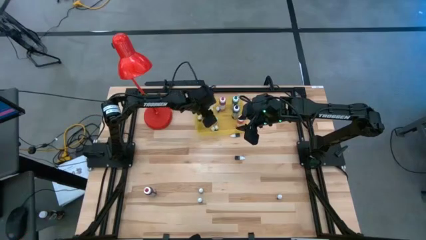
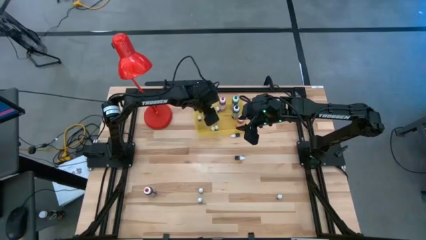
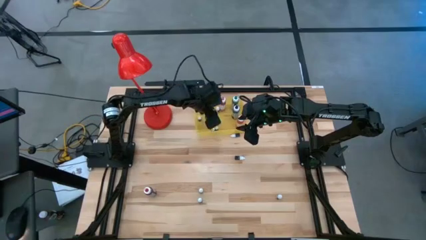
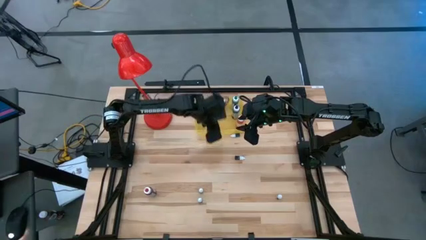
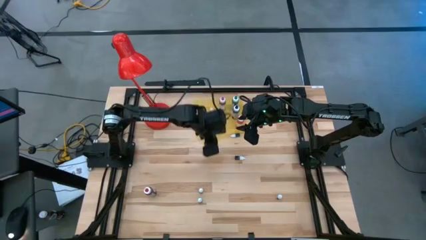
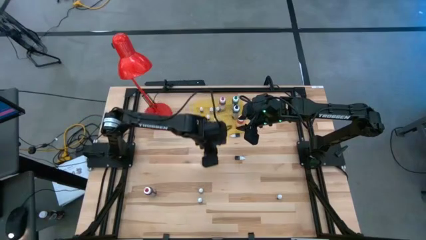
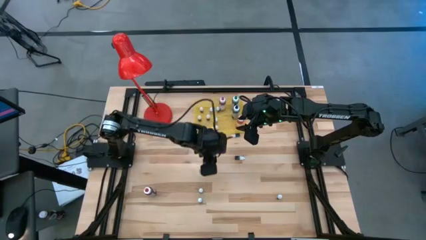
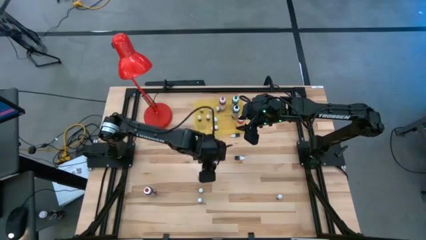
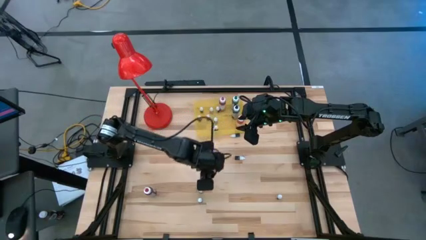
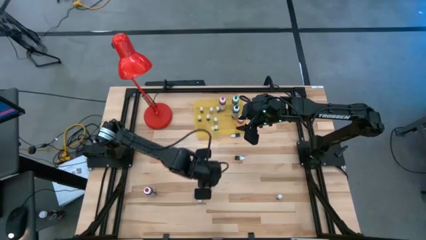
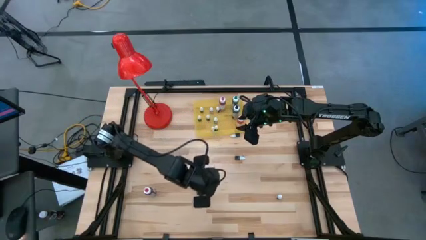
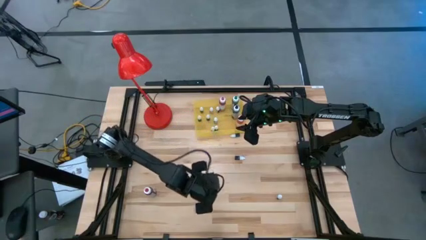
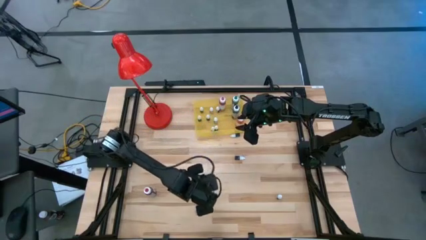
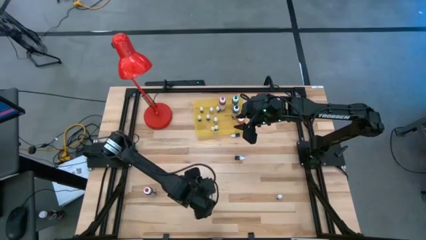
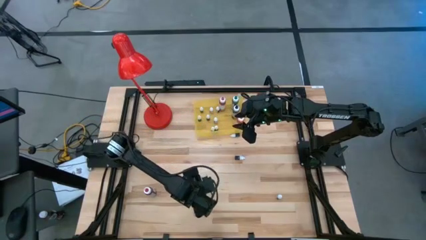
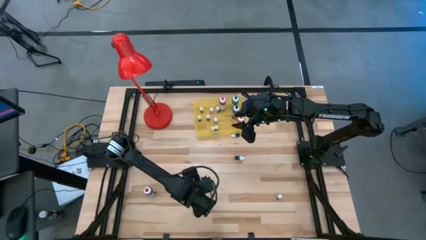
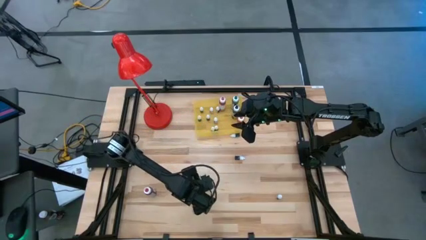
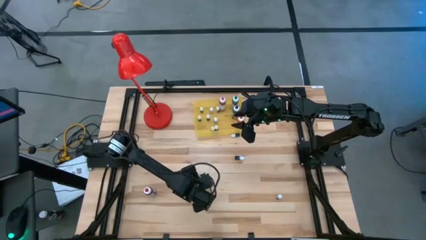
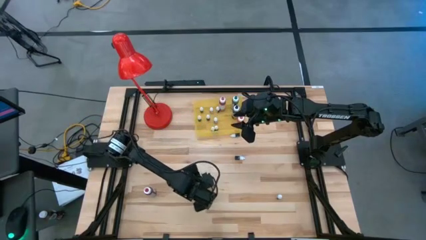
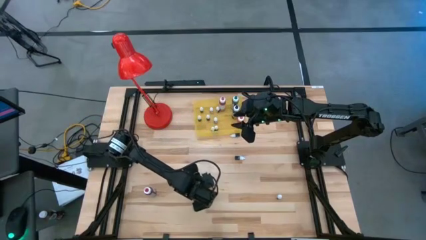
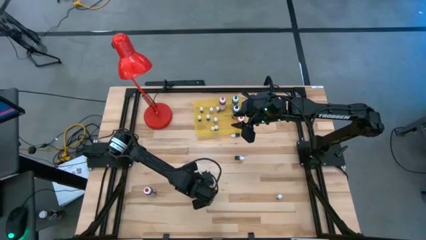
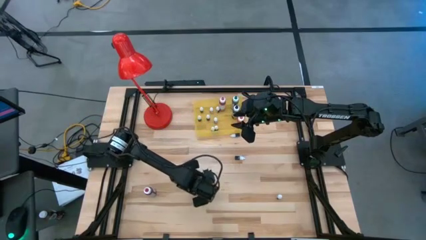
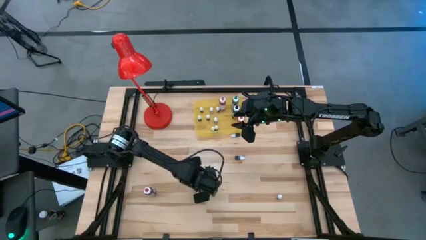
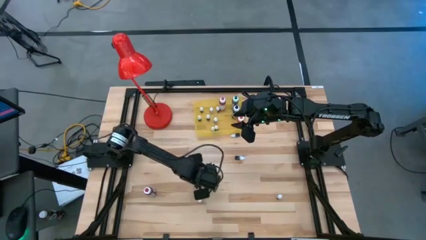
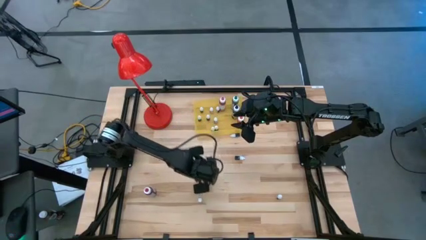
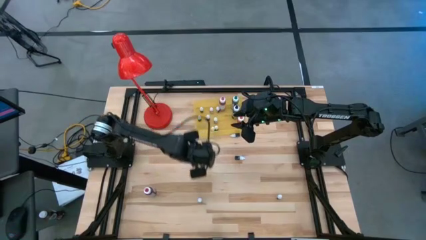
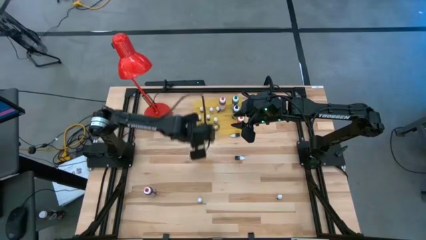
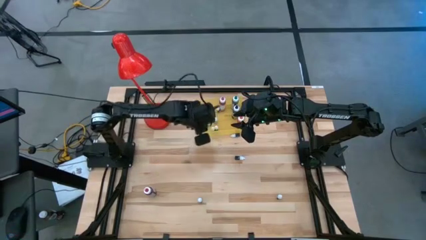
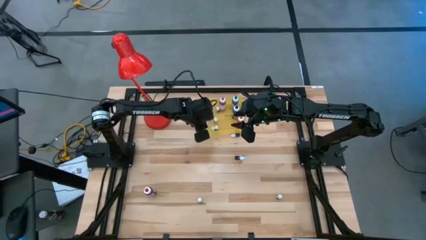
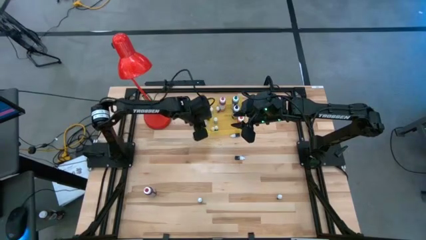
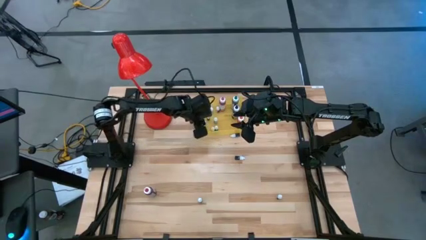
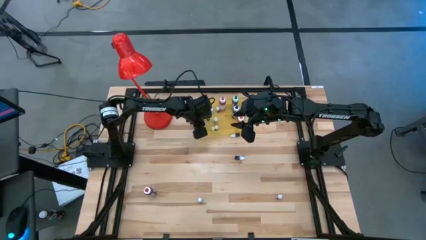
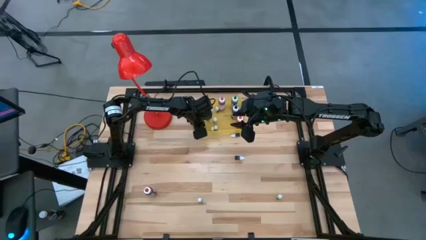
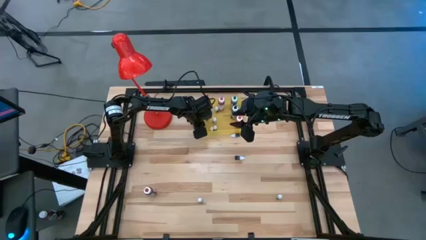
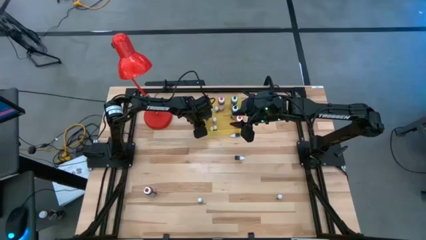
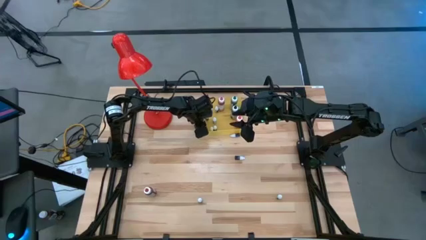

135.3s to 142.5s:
Task: Pick & Place food coloring
Put the small black food coloring bottle into the yellow bin

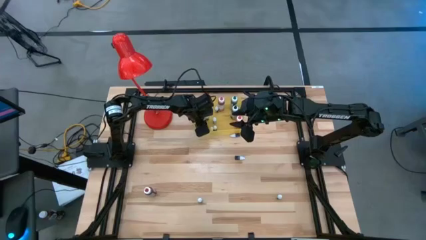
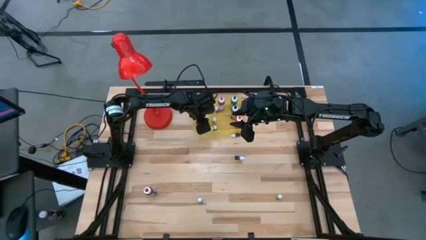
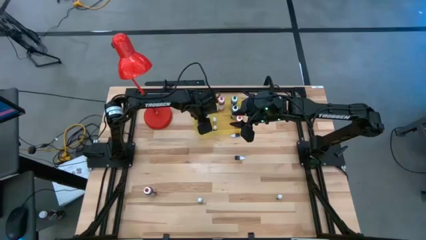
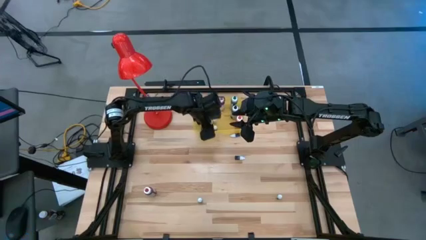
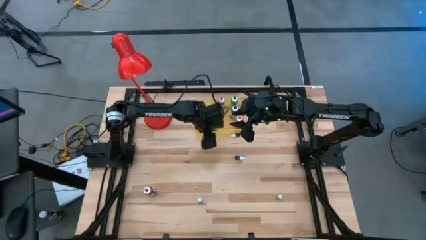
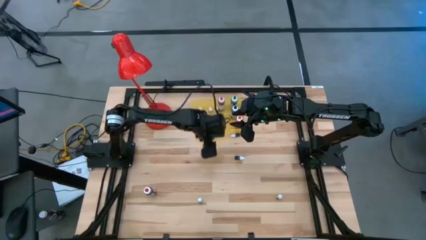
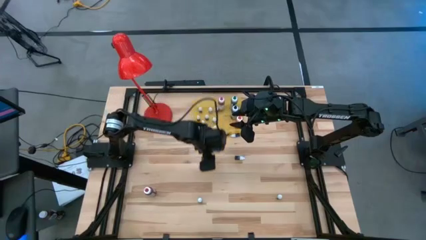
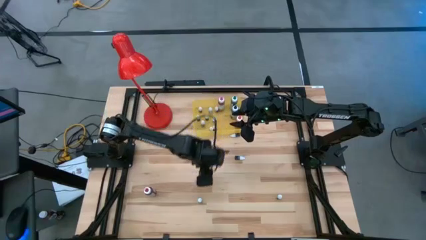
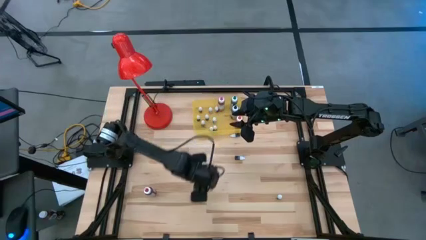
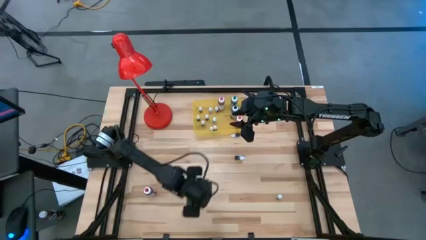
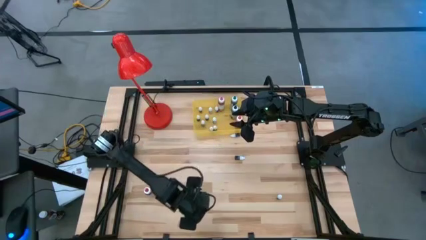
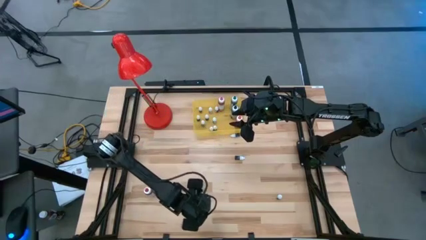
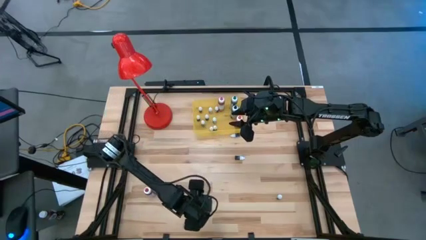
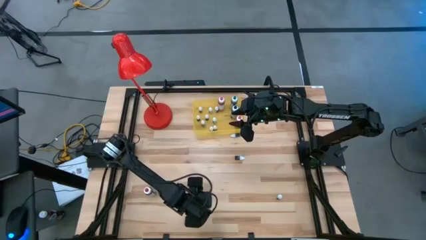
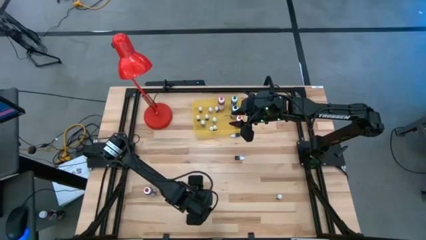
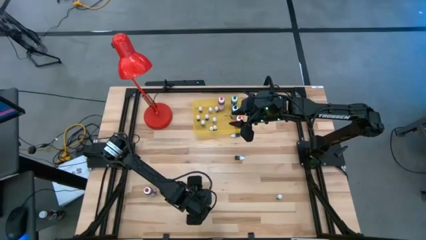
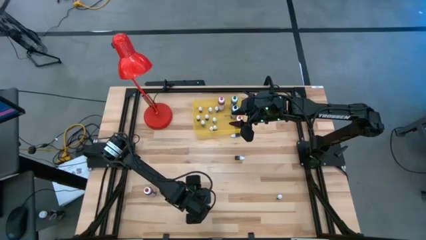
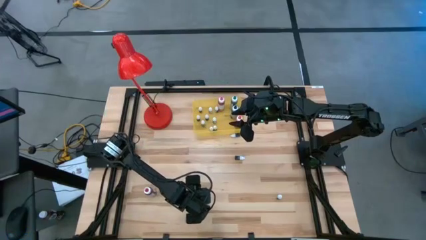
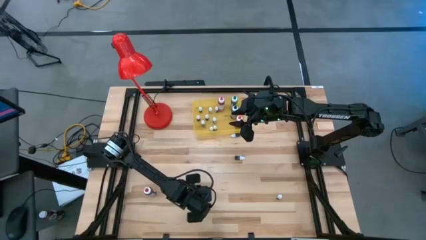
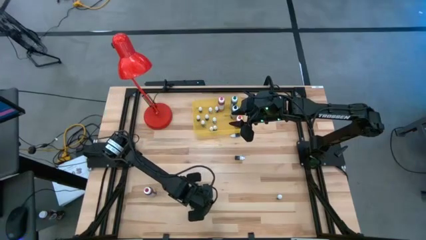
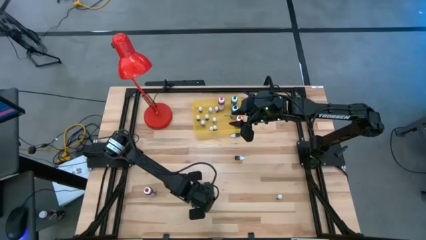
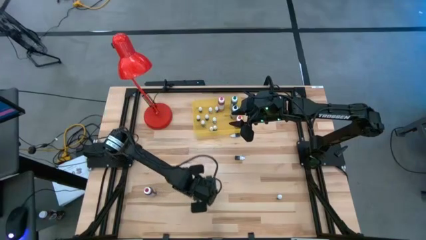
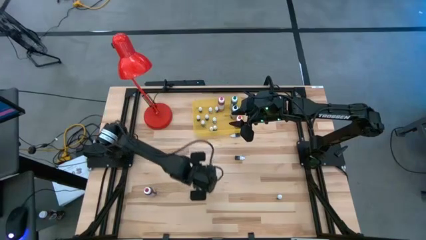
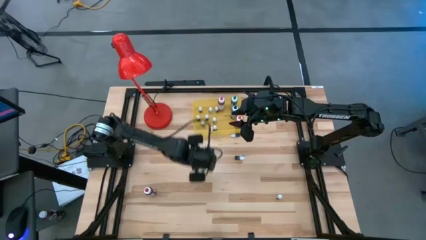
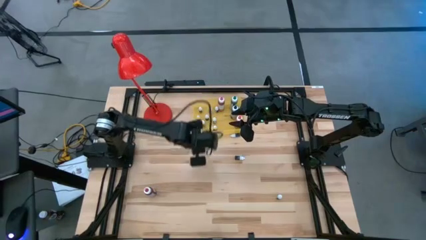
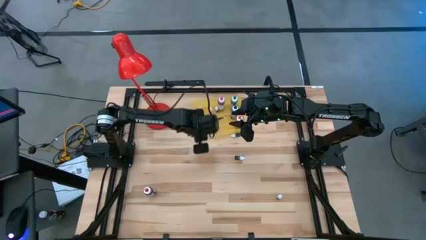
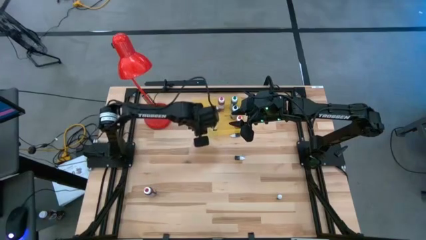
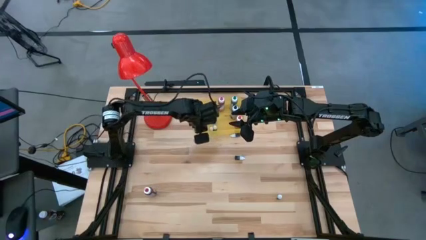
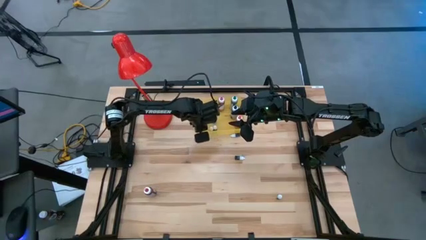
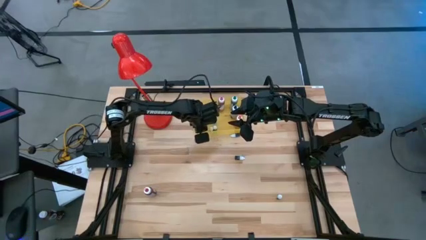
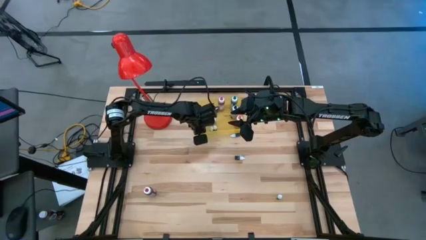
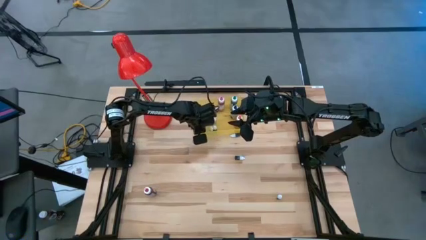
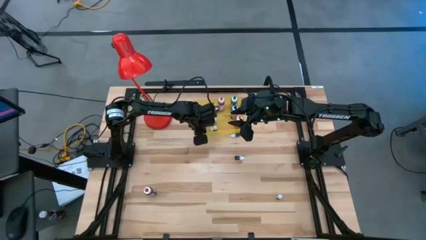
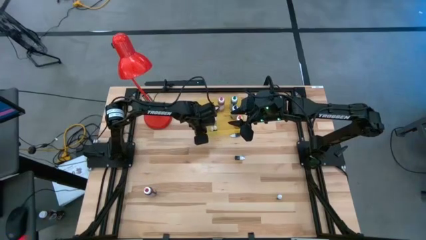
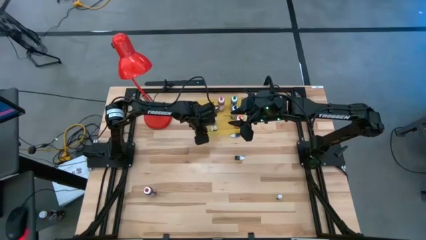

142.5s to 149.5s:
Put the small red food coloring bottle into the yellow bin
